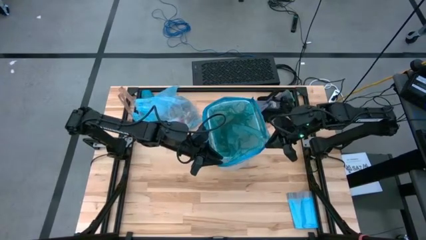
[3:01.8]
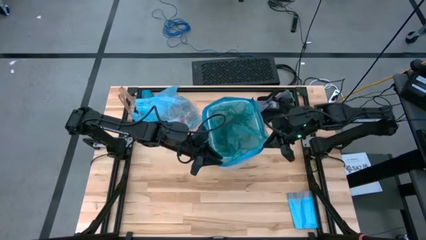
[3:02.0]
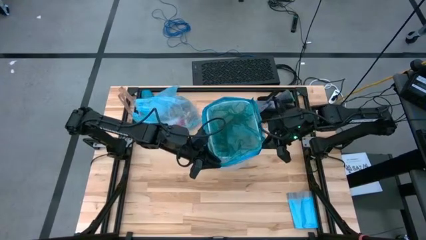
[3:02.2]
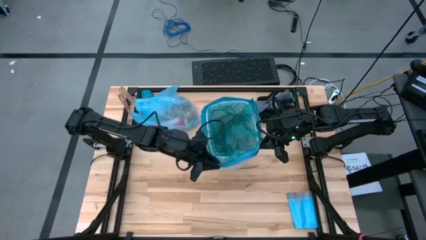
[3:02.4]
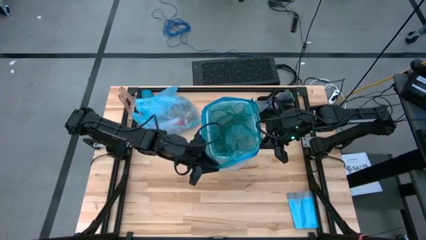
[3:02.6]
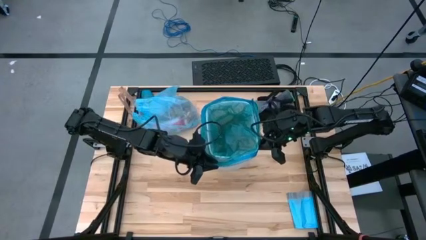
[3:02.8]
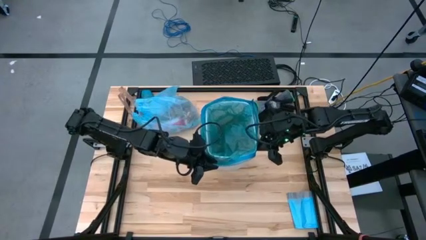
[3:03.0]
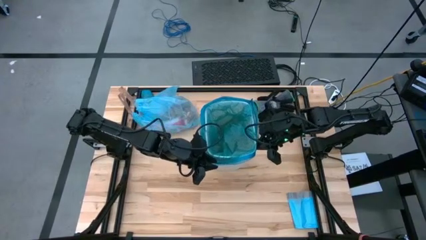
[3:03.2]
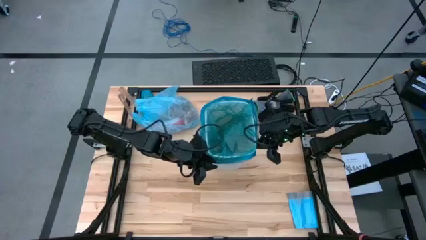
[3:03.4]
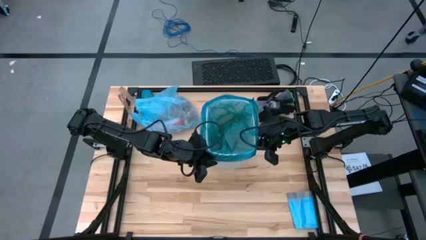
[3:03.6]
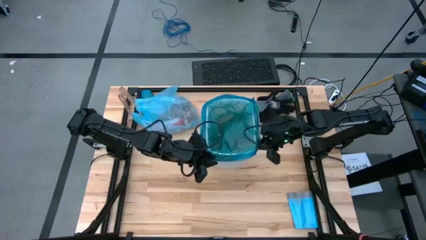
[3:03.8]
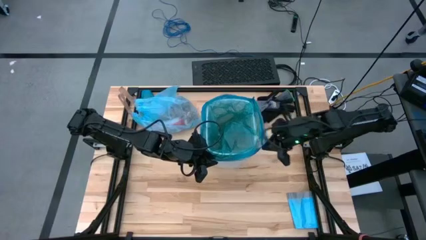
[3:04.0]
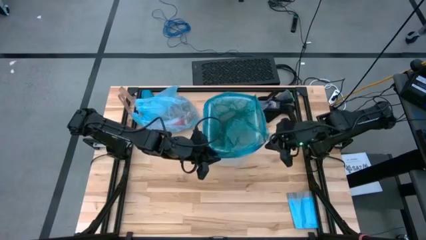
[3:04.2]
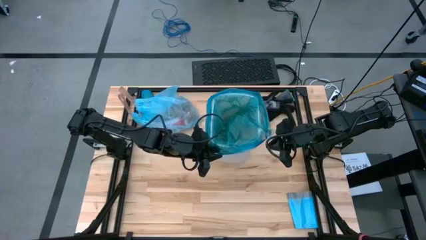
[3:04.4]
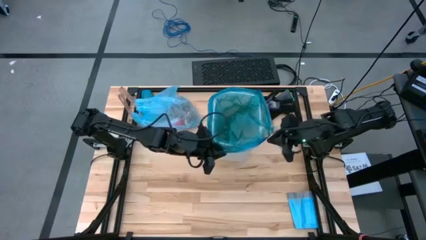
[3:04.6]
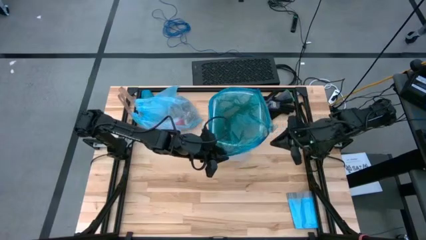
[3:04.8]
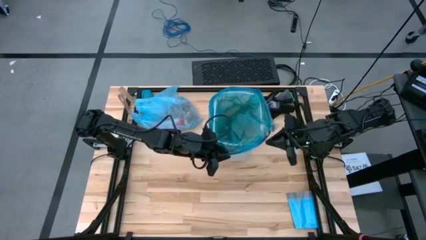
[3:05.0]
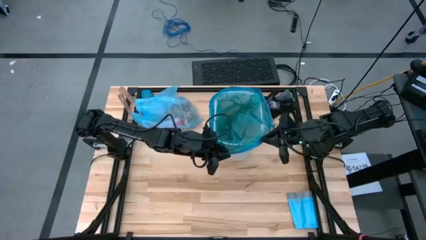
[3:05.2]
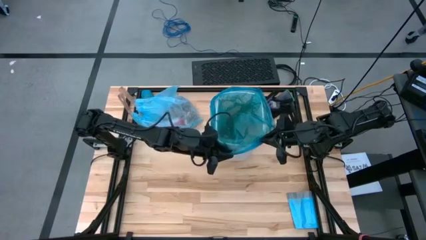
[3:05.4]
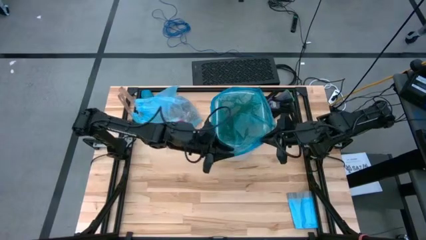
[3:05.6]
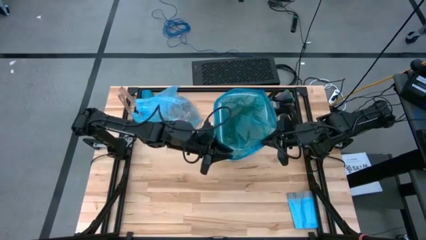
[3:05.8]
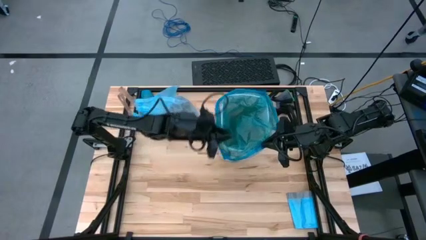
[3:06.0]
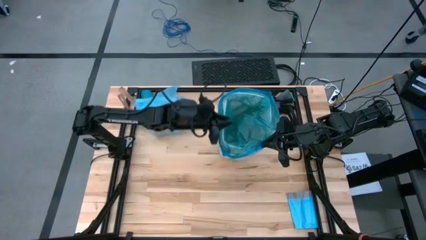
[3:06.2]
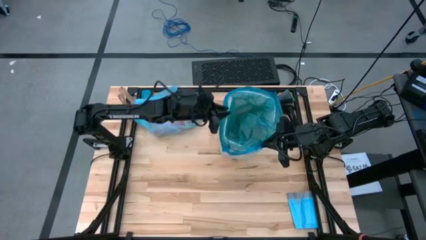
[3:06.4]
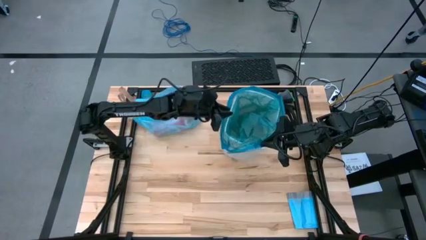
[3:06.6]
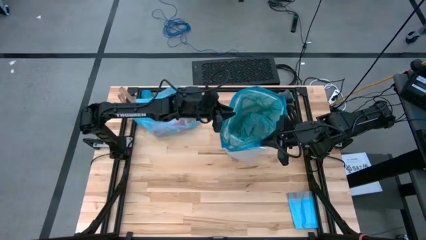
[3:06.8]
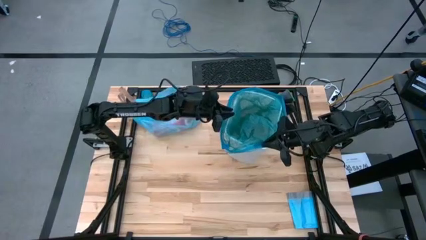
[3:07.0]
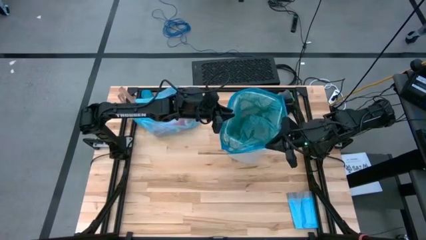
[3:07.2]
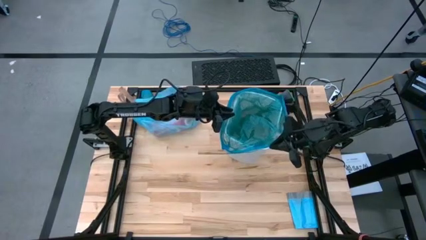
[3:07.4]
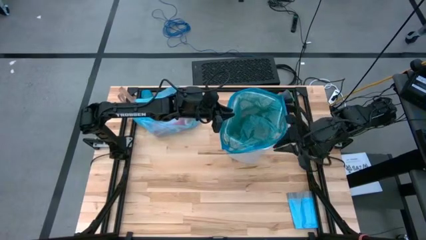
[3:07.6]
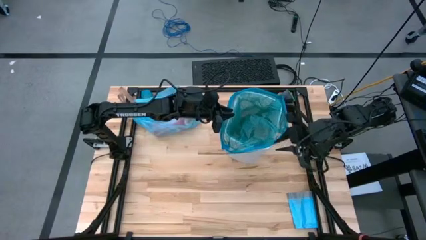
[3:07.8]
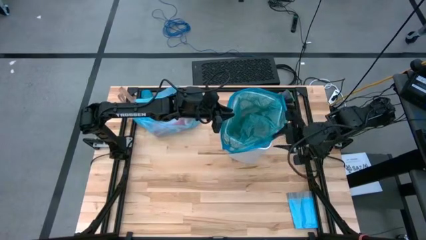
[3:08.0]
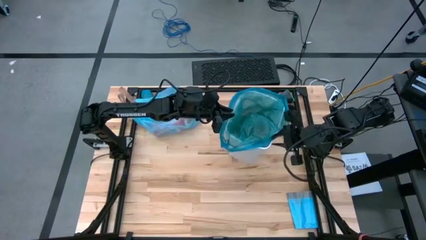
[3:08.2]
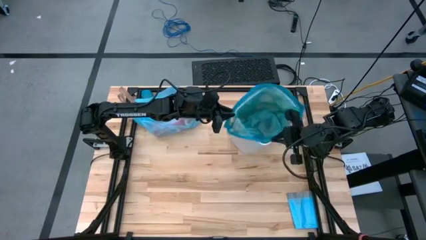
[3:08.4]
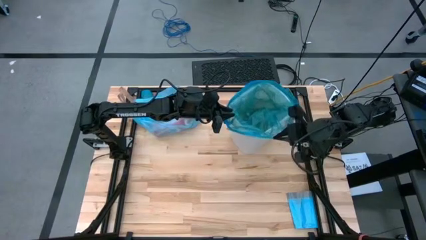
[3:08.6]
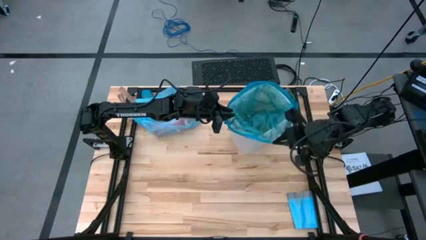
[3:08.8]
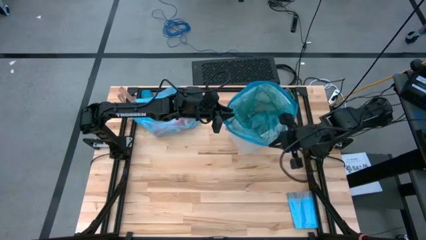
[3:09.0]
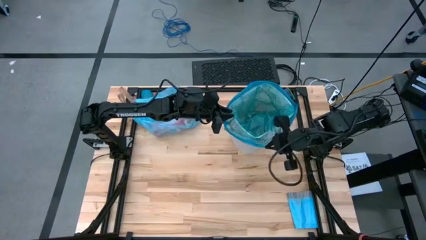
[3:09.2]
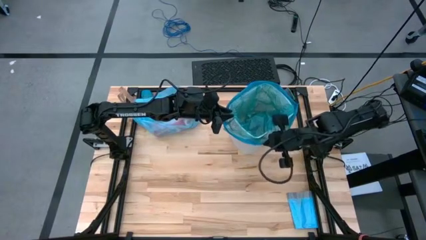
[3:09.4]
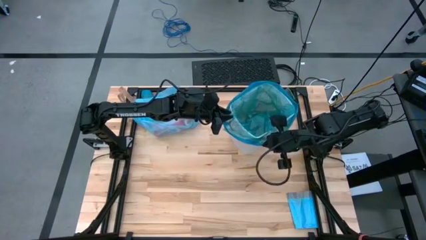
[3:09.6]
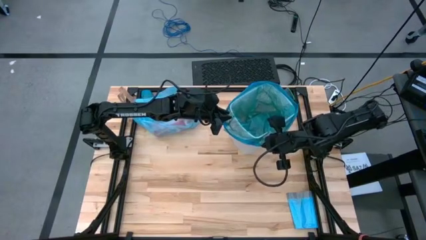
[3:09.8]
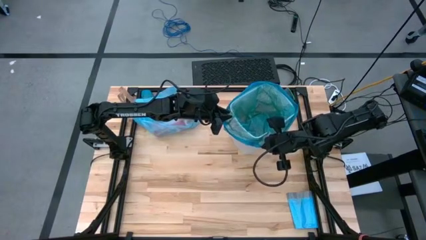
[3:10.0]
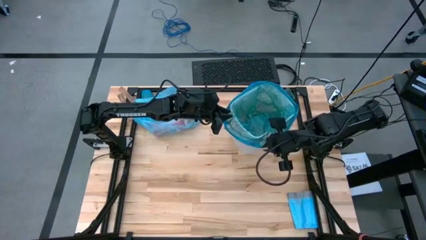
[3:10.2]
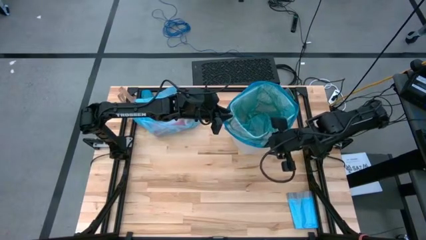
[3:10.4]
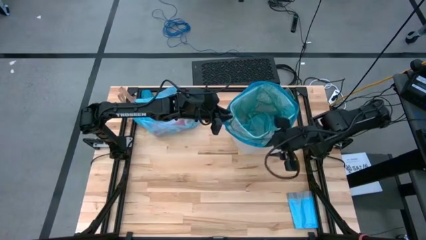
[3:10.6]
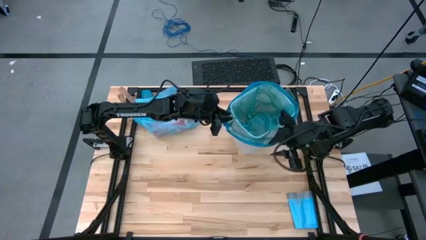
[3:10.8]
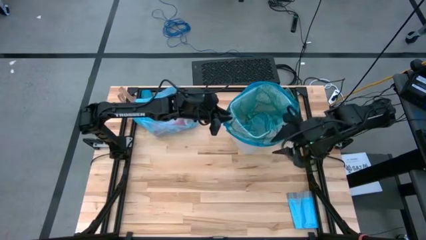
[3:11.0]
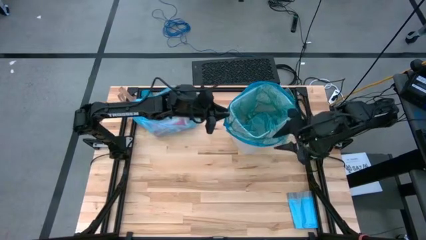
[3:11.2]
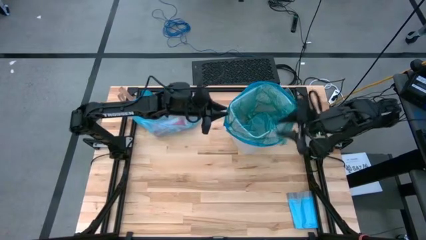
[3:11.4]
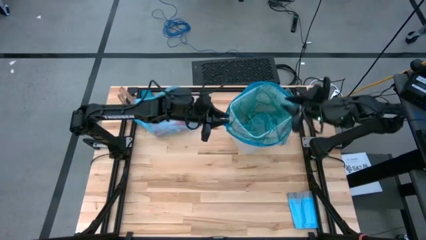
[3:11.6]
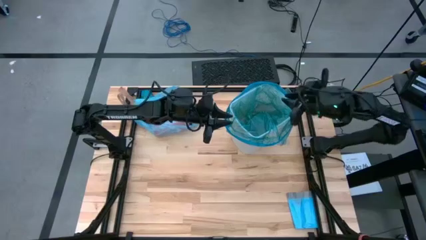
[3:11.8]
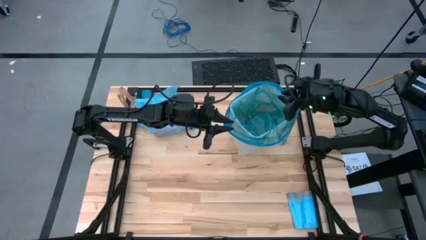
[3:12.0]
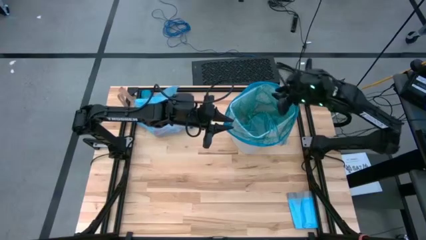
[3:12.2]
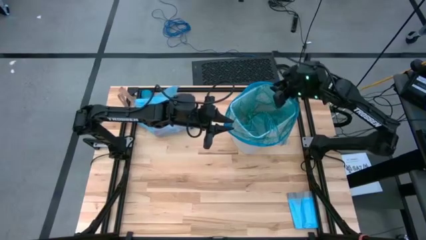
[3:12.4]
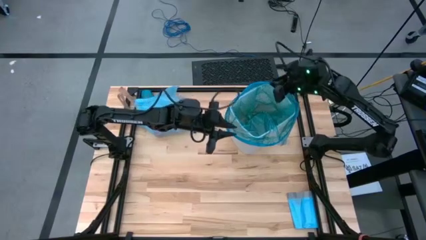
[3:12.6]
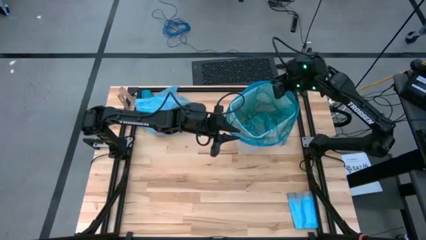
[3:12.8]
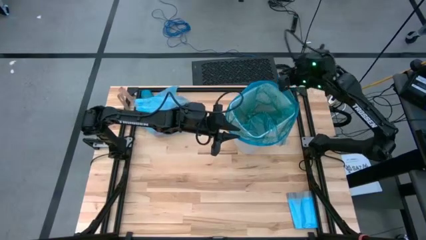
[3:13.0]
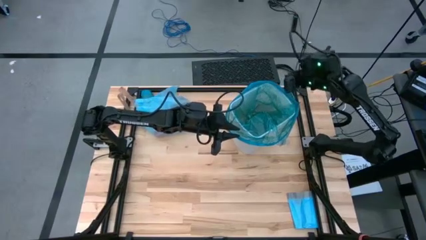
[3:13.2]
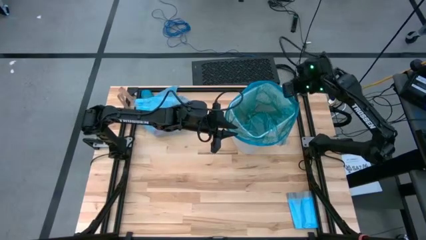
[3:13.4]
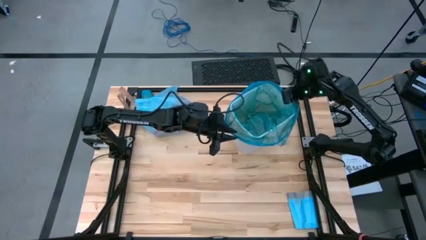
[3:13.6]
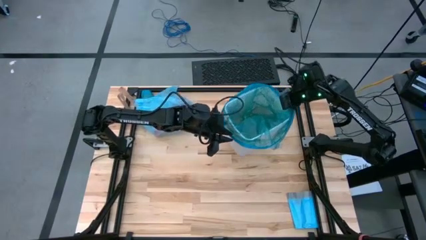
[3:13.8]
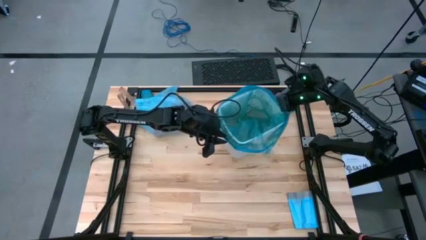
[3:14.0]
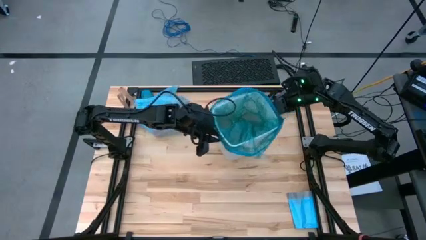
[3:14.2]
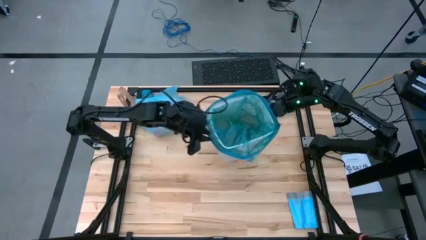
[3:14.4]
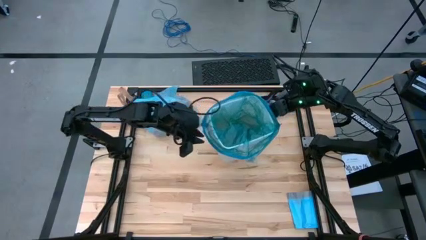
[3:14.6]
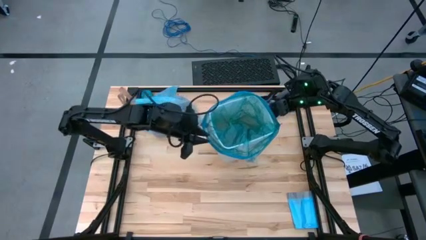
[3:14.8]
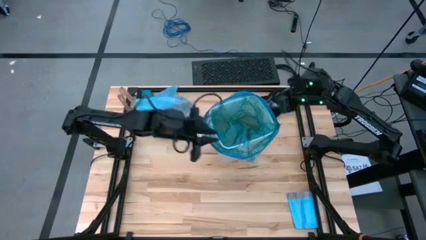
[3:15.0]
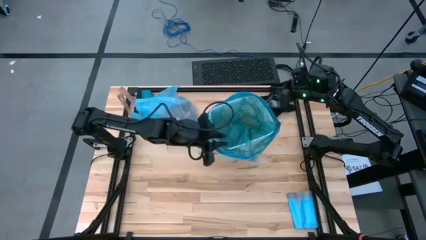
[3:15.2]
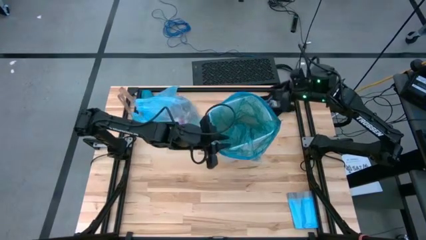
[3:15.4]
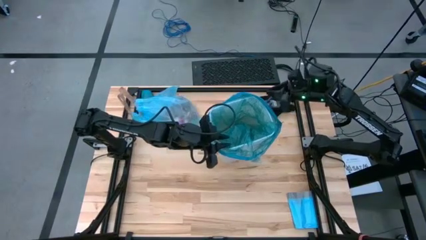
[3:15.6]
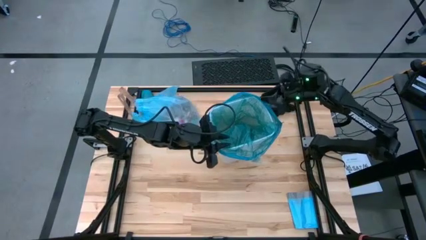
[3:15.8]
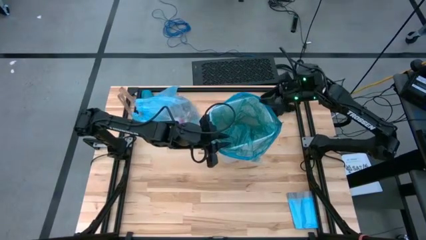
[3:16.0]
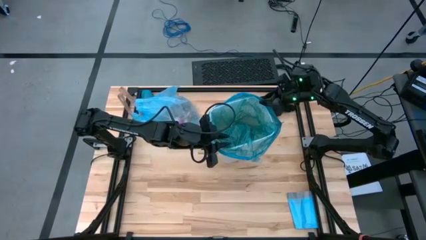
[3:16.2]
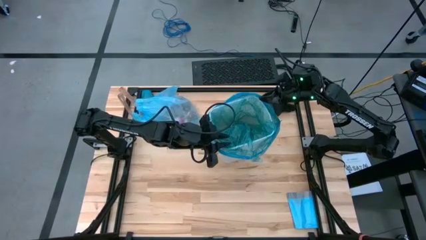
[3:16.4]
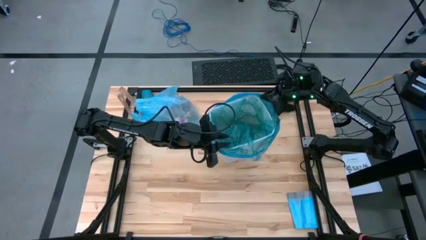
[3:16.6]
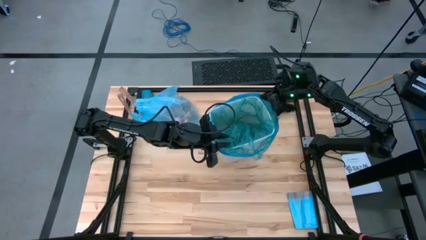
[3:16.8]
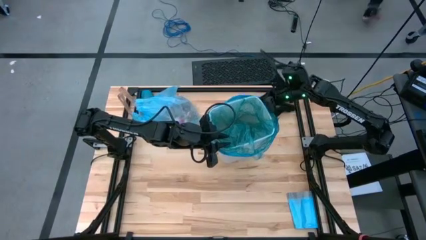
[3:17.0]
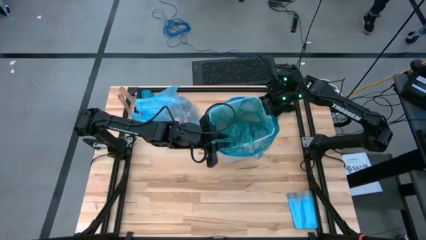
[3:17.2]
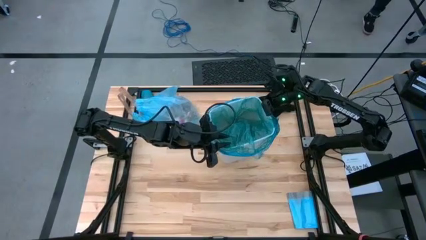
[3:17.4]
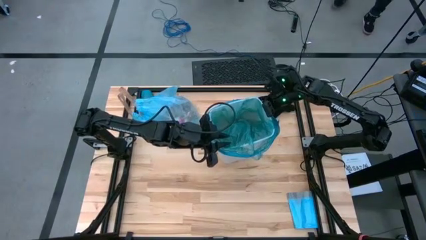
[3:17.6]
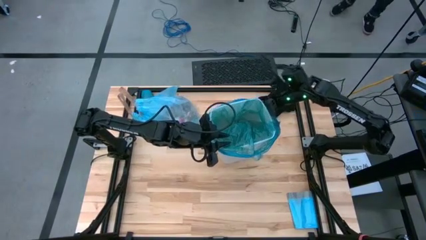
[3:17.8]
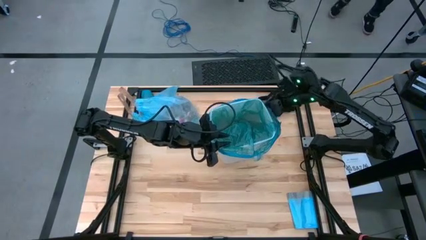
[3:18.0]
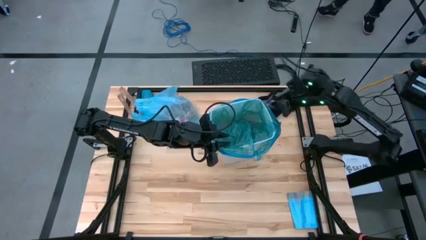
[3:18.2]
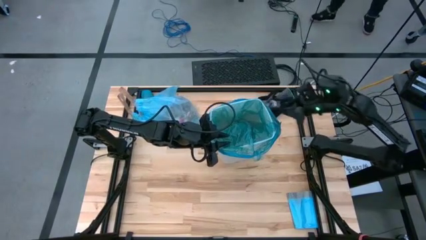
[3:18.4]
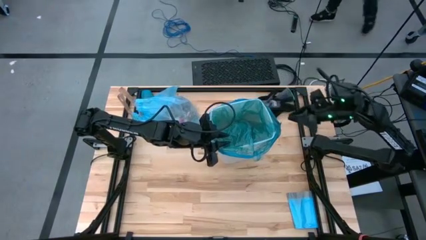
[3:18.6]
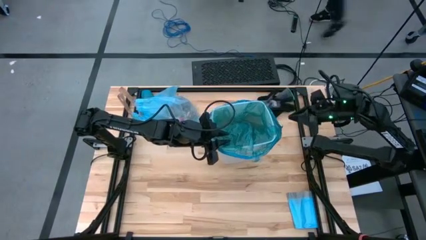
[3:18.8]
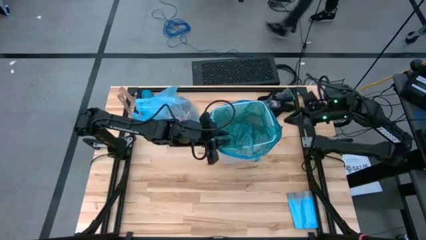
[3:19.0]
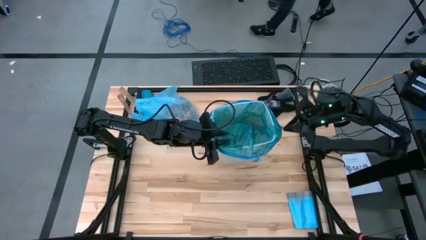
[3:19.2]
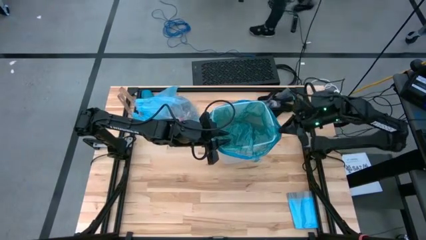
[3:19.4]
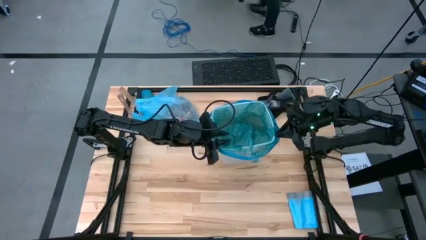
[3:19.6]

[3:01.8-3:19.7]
Task: place trash/remove bag and relplace
Insert the blue trash bag into the white trash bin
